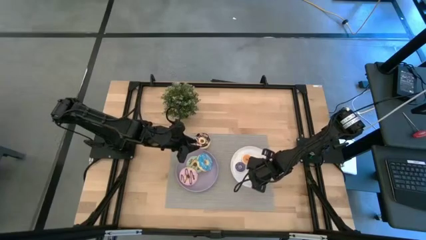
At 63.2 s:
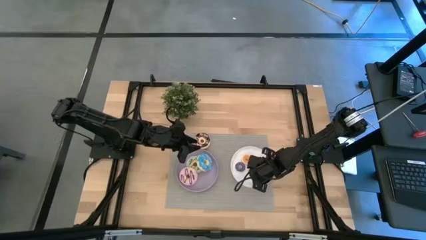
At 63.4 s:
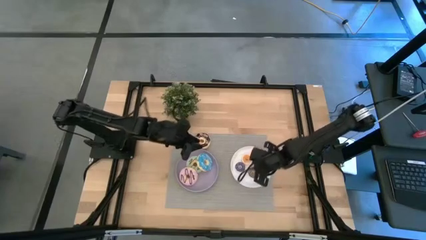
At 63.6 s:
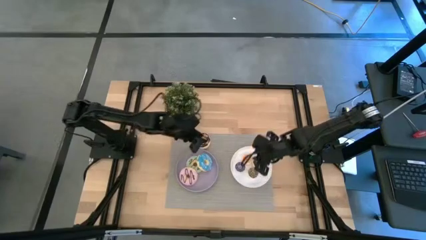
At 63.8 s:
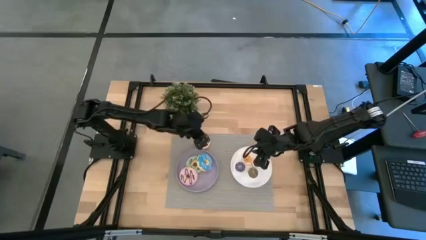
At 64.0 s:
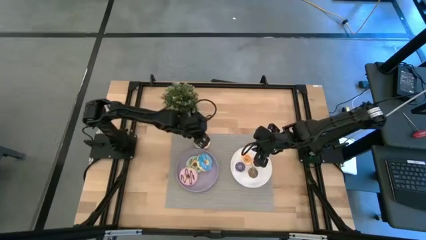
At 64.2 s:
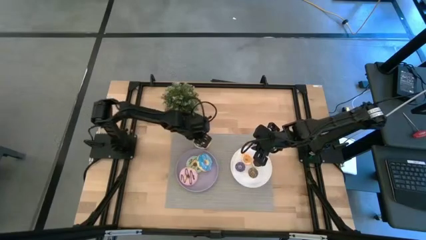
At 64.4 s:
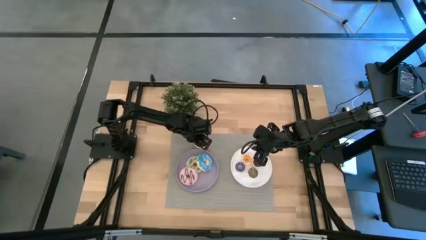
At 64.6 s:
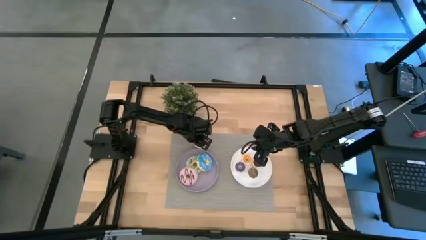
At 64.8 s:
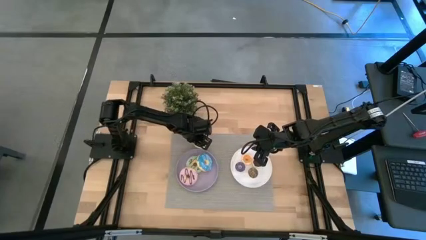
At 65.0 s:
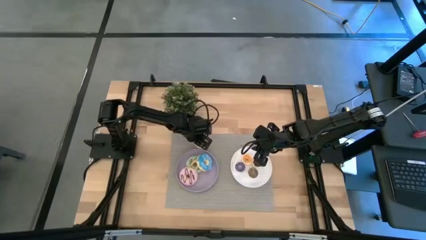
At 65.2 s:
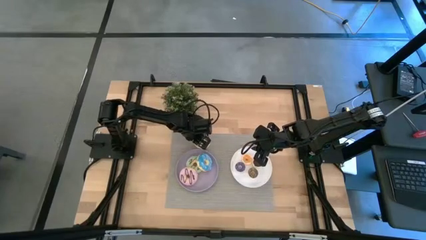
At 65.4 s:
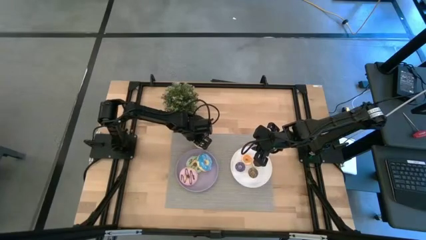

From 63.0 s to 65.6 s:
Task: Pick & Place donuts
Put the large black donut on the purple plate

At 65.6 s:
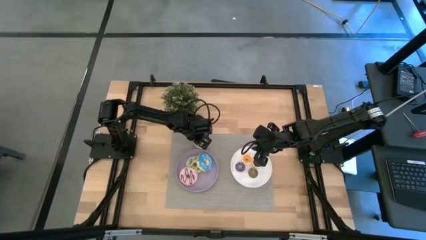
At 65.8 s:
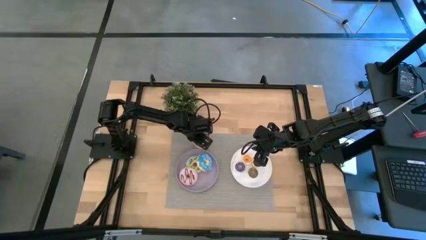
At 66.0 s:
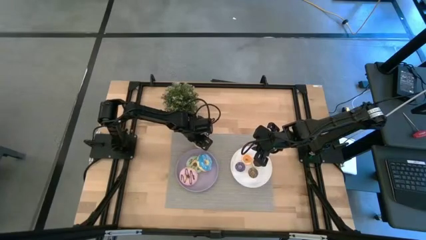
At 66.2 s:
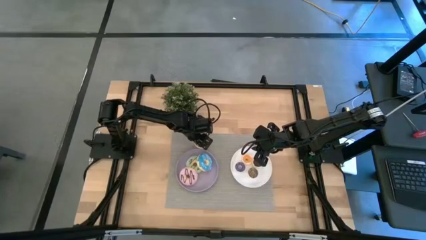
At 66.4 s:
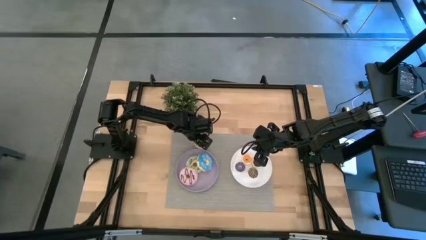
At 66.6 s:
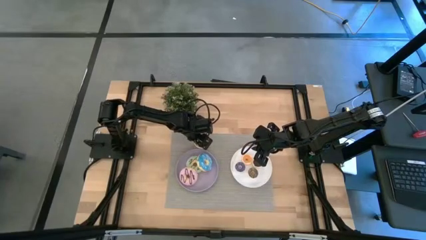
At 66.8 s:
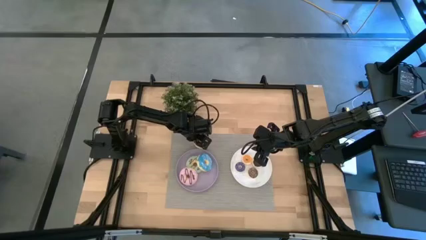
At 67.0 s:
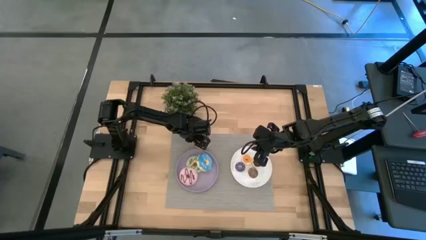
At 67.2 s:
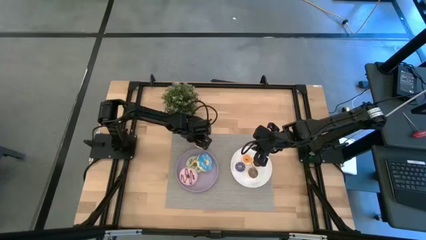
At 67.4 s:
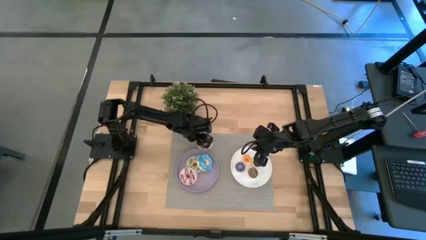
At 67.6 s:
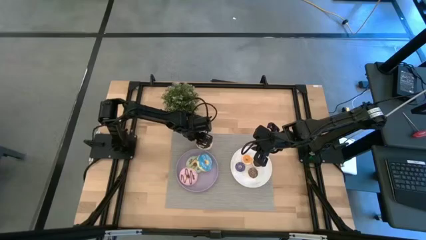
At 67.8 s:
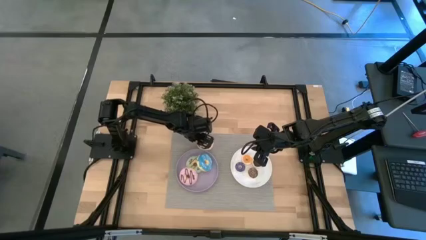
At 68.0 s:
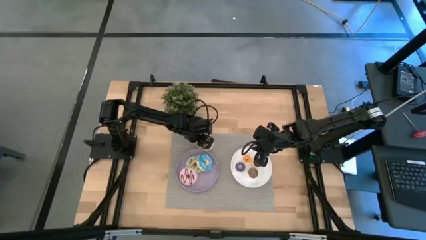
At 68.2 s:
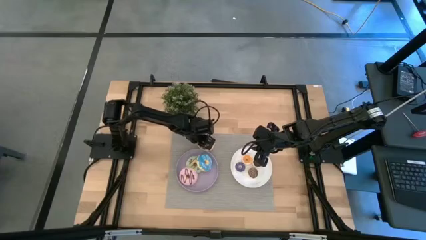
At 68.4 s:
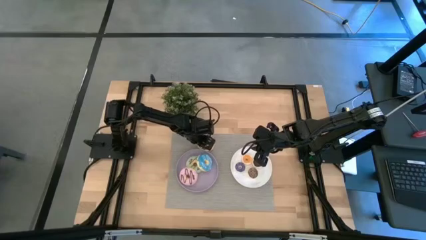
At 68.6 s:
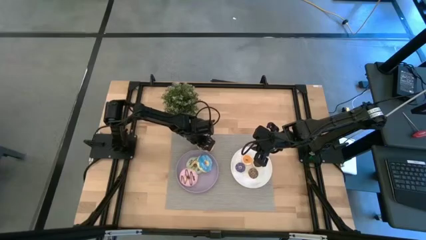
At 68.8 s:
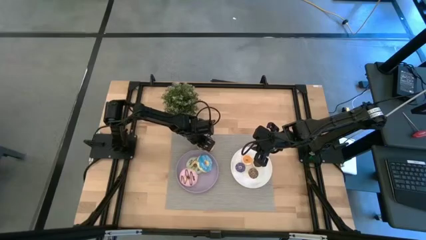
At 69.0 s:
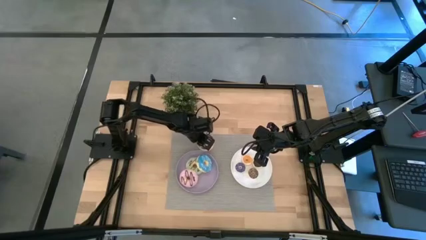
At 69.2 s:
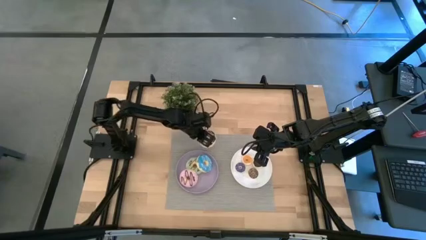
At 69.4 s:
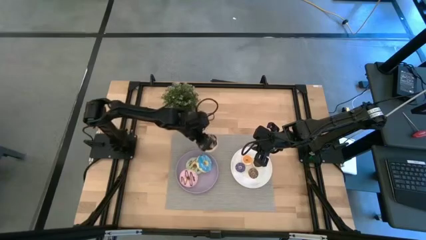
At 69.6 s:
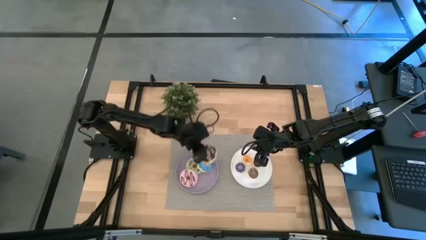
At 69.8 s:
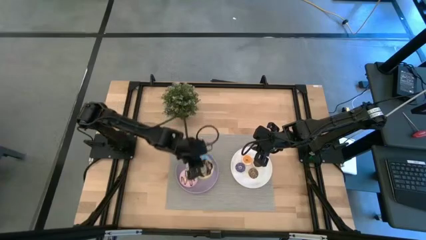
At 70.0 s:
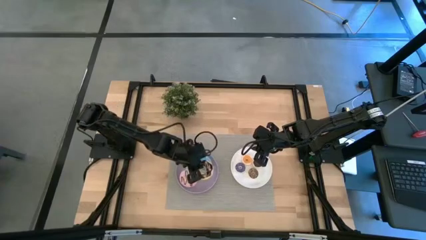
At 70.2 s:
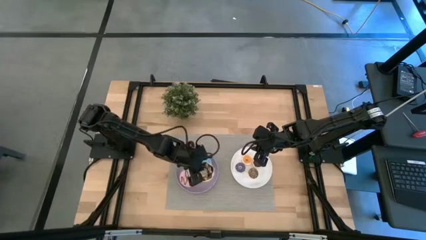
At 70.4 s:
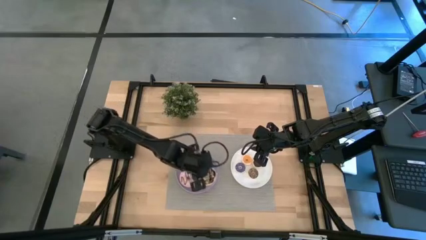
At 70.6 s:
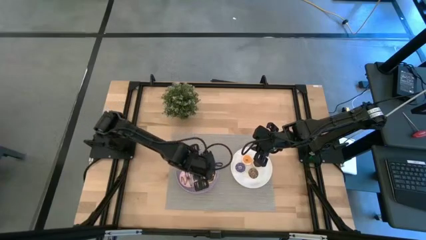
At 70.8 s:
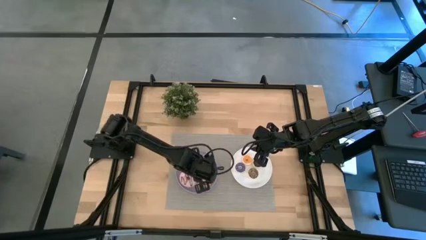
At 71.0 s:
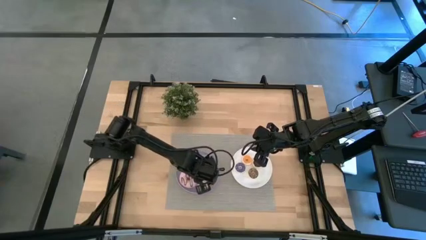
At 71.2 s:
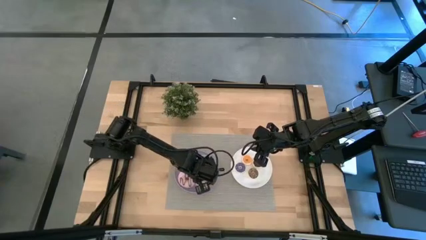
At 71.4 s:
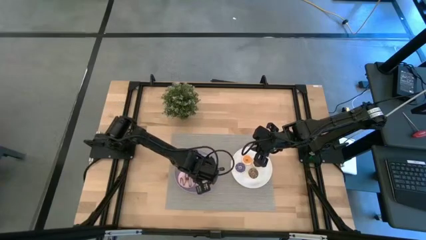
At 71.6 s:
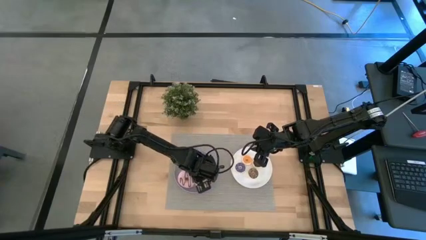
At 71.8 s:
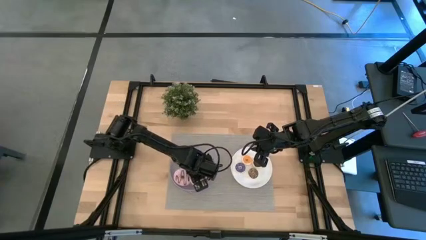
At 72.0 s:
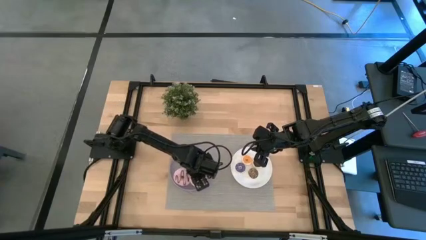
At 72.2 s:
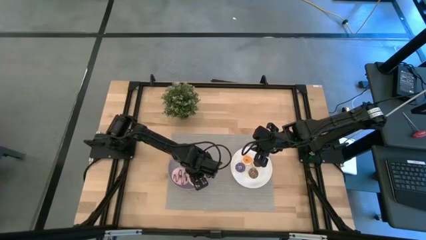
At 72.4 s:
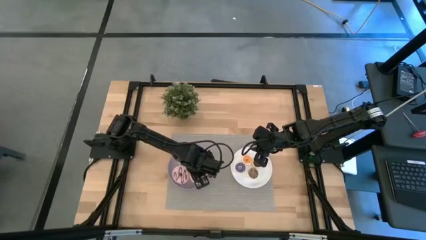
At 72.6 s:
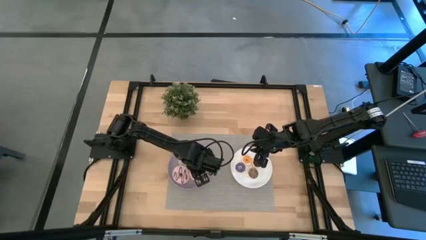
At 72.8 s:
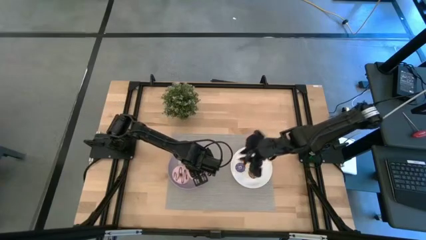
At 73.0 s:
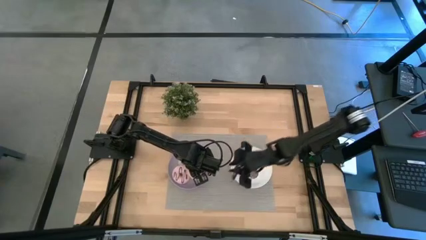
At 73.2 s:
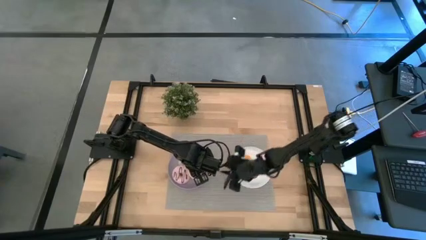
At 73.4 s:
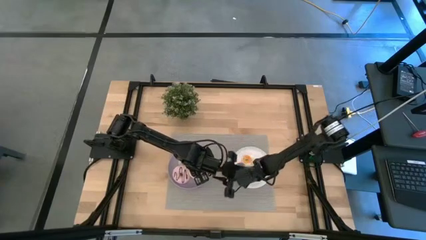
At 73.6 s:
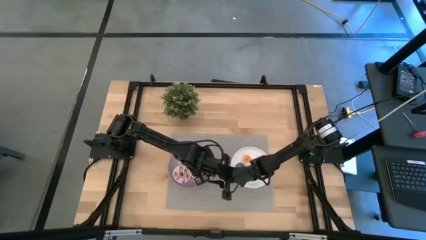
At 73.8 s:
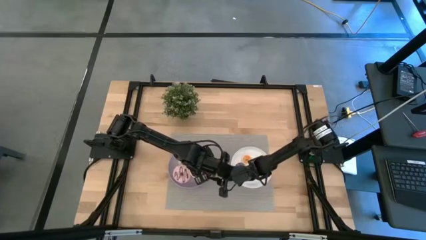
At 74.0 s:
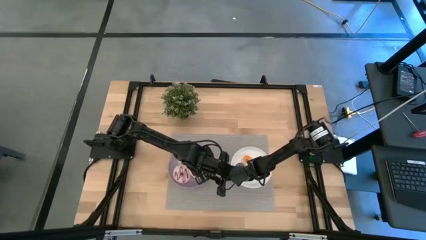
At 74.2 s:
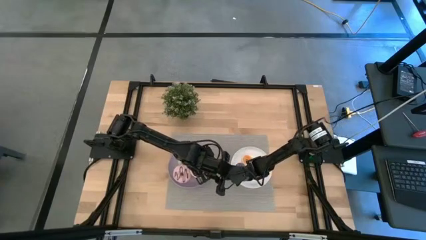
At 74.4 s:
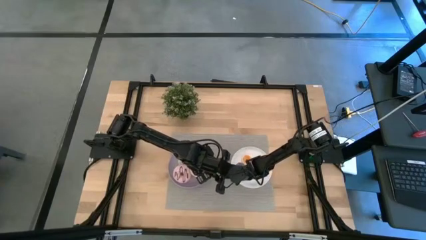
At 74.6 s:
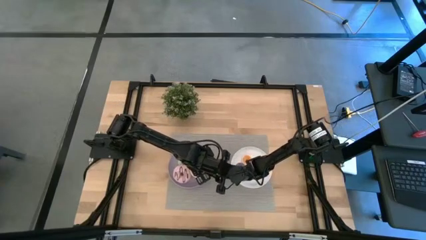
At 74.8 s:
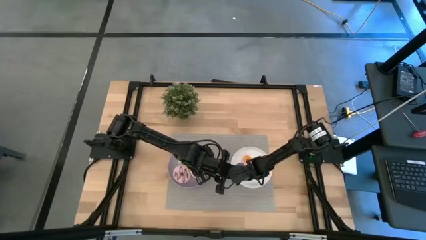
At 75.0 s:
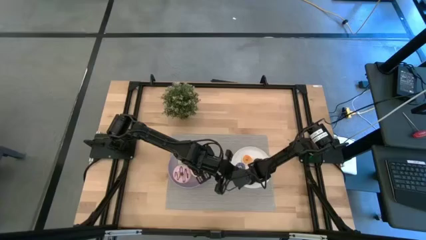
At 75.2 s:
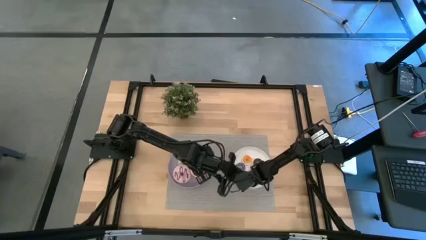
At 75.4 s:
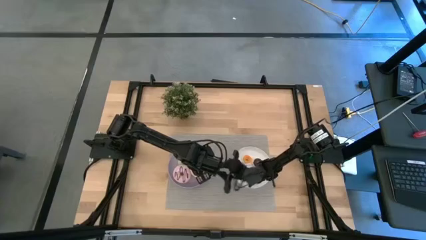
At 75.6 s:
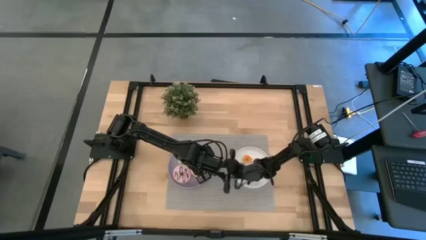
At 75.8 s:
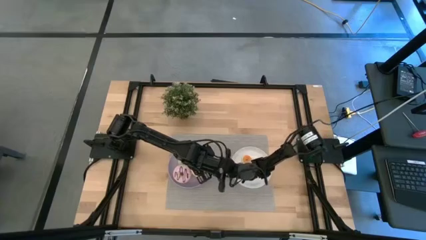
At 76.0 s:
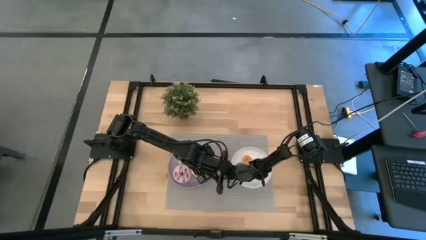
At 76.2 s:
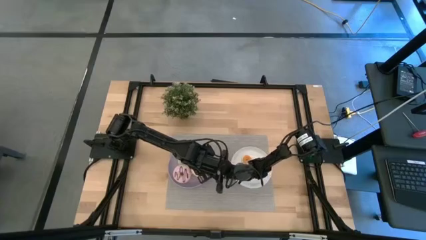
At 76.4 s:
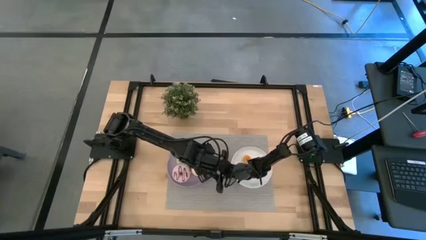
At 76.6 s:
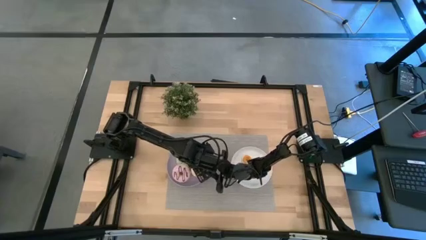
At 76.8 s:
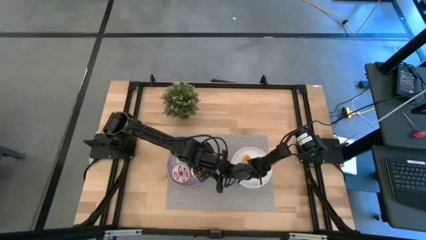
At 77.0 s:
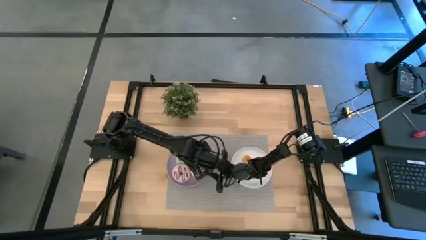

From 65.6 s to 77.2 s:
Put the large black donut on the purple plate

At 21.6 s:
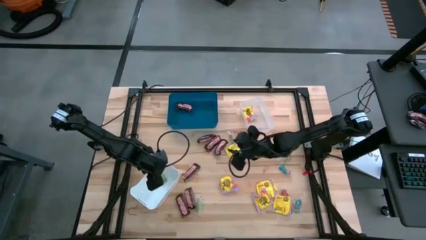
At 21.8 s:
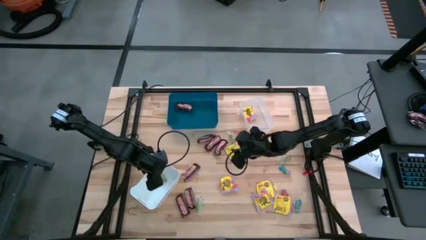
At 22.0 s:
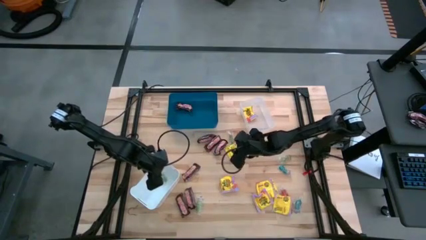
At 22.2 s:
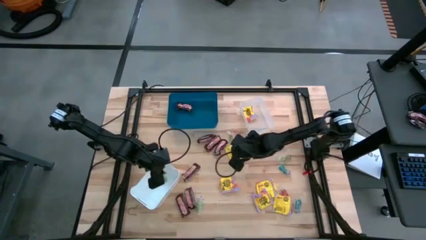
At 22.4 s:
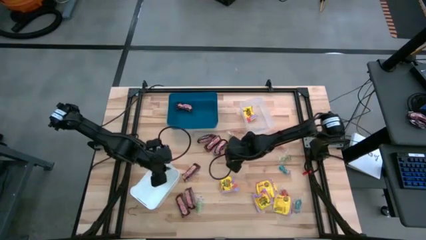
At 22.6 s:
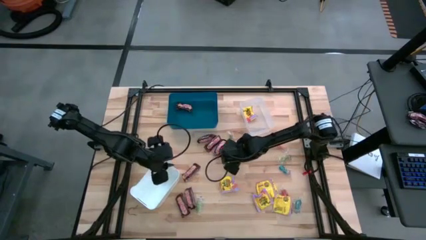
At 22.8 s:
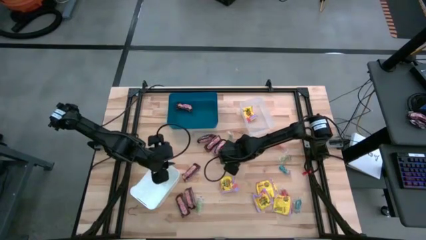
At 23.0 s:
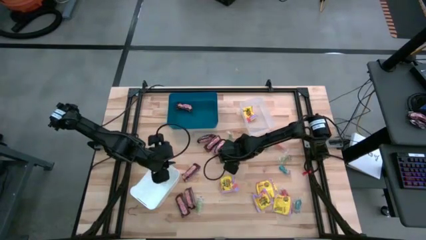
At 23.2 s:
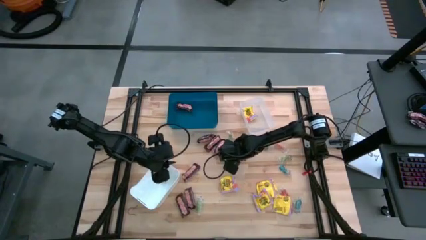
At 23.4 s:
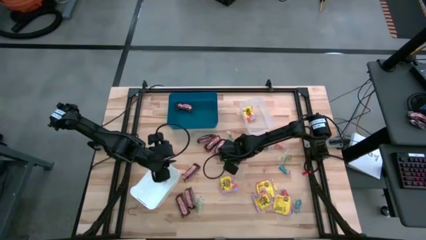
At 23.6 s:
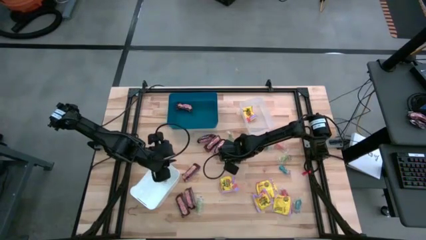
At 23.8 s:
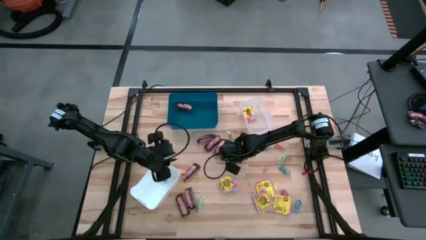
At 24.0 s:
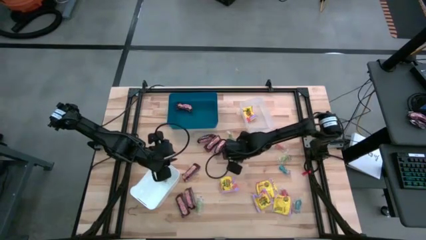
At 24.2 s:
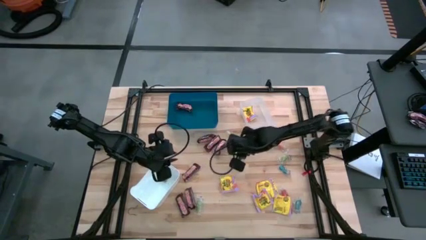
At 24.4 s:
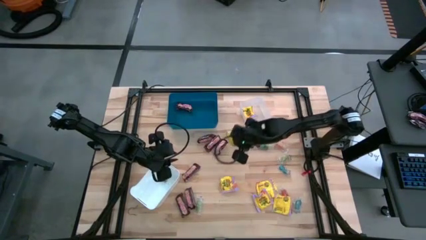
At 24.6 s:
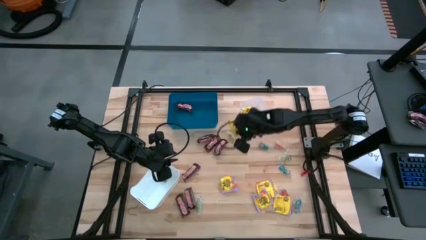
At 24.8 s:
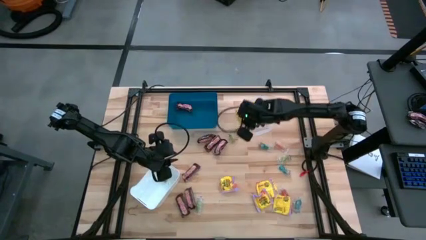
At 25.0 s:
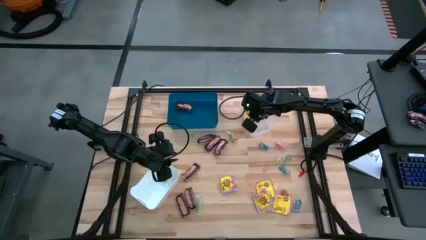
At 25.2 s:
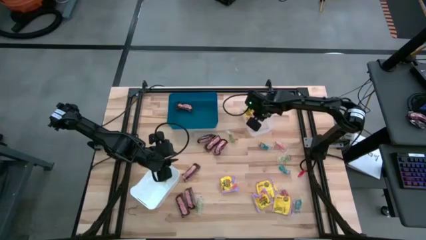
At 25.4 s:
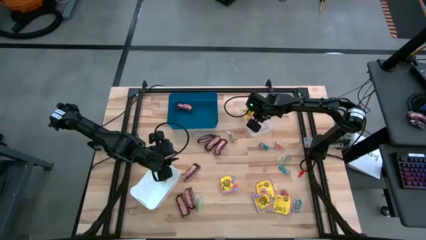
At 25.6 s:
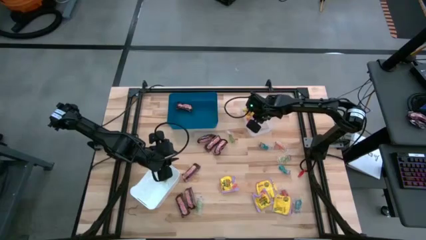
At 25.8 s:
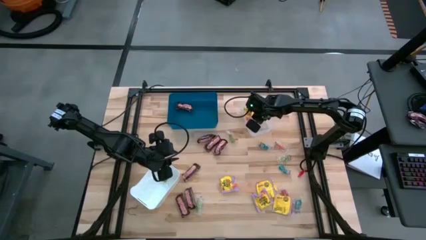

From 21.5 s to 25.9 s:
Task: Sort candy
Put the yellow candy into the transparent bin
